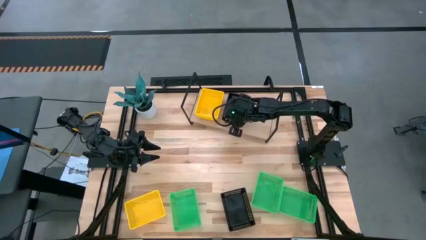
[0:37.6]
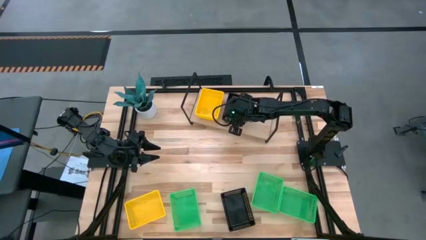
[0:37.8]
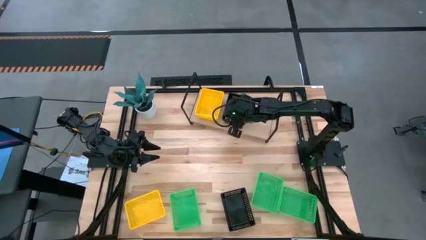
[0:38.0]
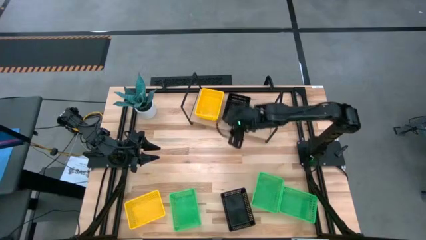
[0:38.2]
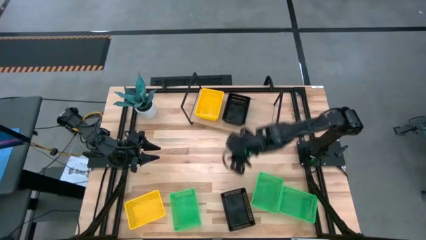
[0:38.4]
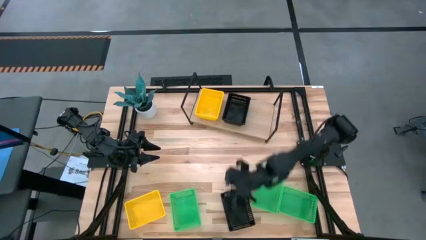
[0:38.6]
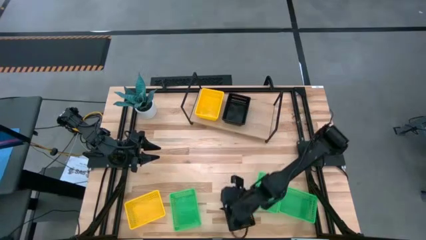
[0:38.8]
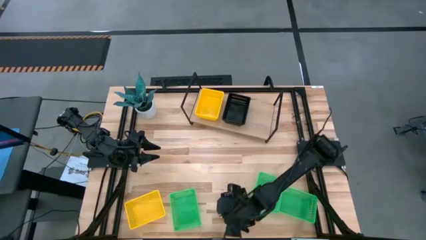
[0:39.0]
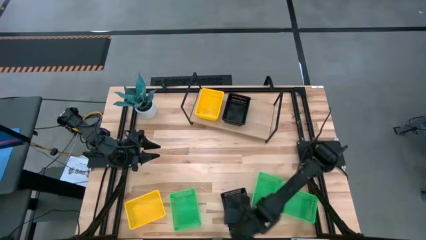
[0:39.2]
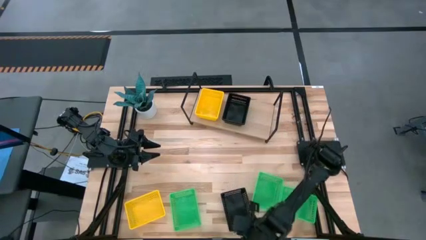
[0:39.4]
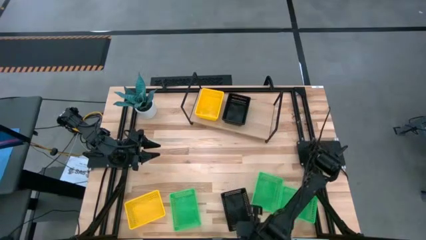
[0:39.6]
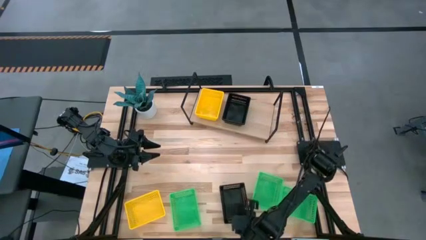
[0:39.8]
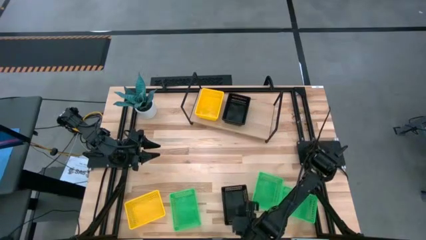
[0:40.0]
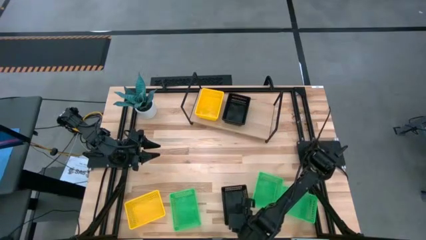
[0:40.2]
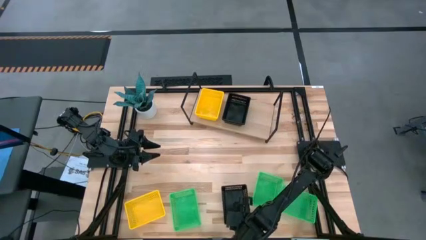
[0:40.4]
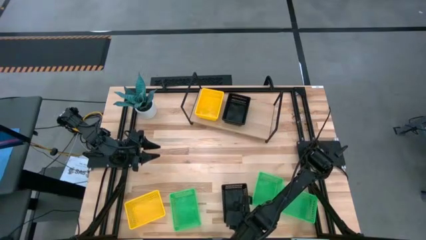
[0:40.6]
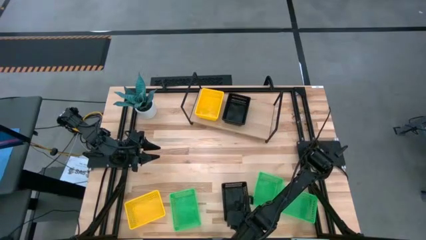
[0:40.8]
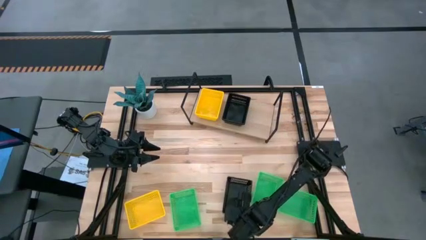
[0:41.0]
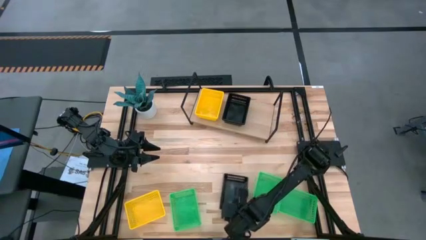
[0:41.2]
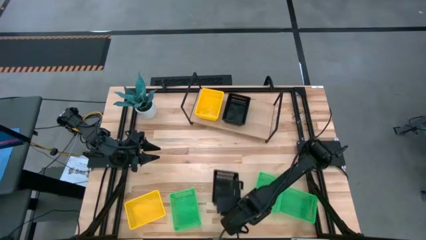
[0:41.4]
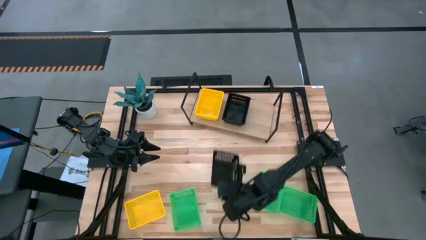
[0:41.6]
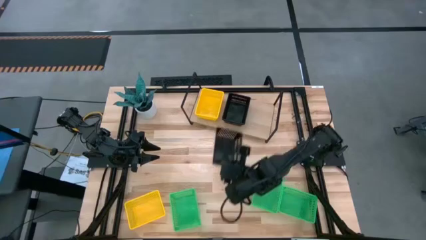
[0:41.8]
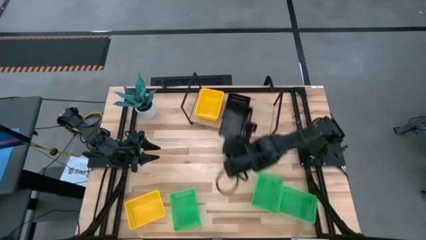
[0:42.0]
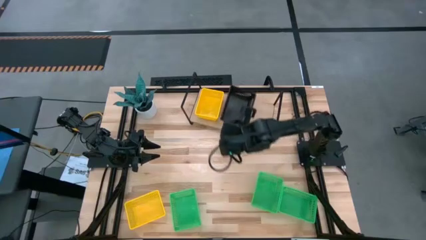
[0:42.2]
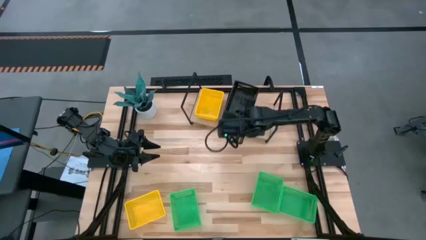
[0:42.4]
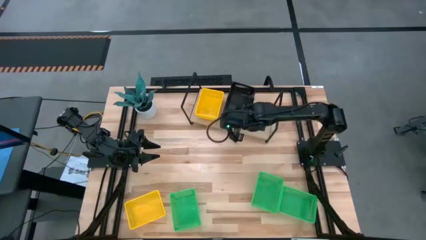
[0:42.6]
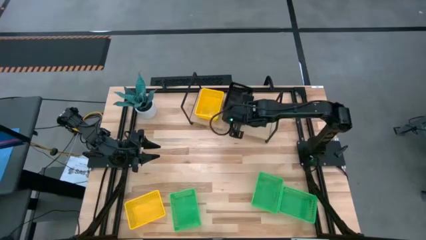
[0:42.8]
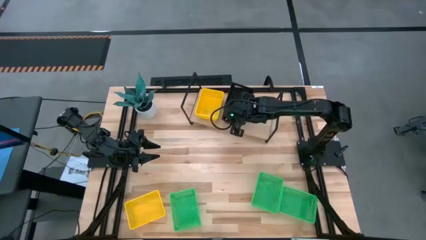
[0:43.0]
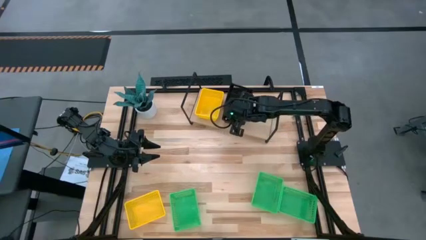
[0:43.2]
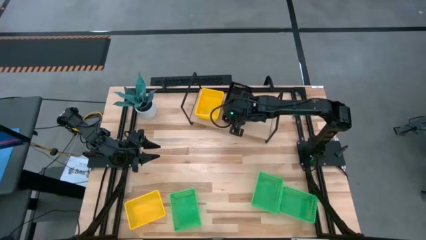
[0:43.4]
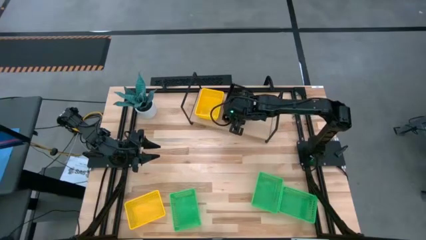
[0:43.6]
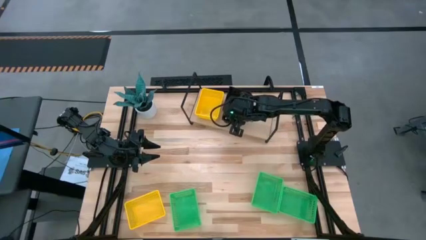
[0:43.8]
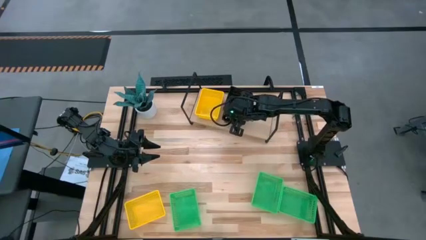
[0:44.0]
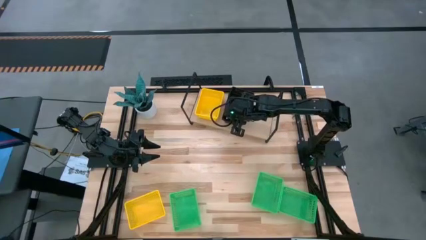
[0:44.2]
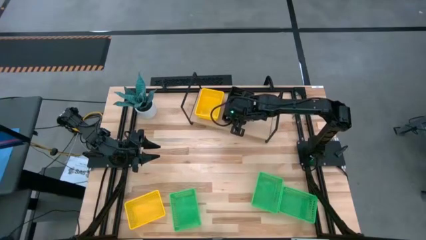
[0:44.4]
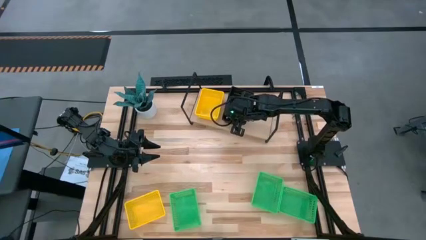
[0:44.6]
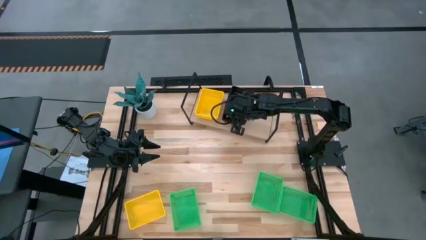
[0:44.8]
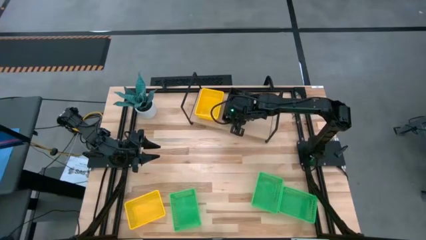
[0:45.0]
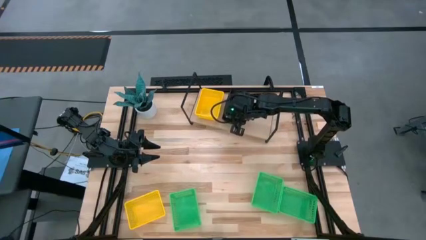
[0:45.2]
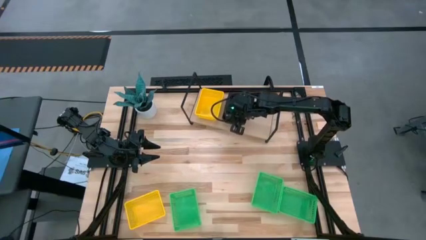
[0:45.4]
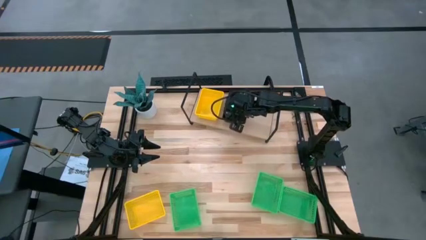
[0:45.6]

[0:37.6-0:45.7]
Task: Stack baskets on shelf by color
Stack the black bin on top of the black bin on the shelf

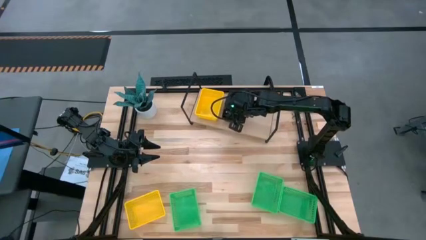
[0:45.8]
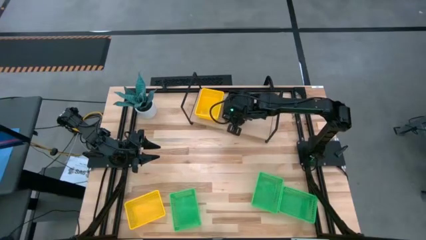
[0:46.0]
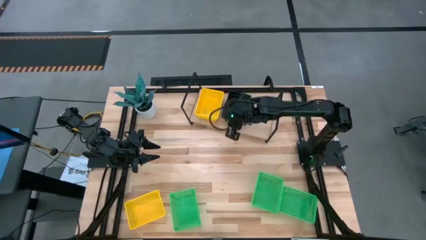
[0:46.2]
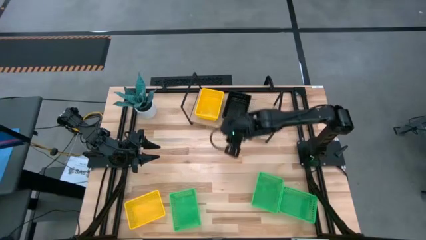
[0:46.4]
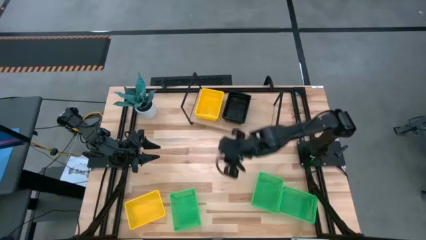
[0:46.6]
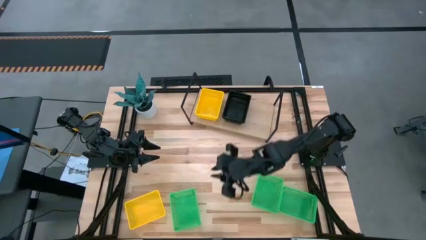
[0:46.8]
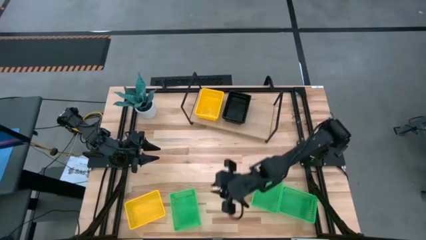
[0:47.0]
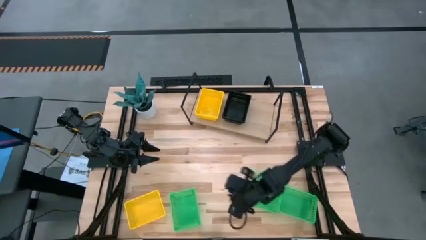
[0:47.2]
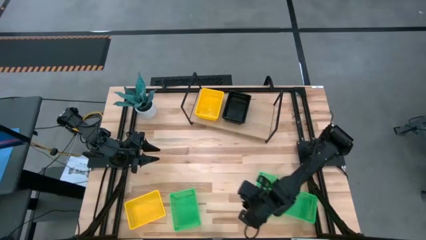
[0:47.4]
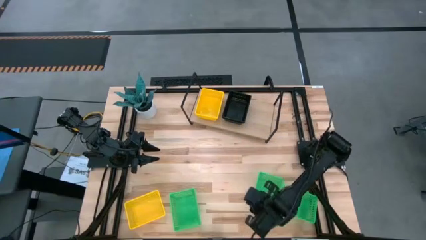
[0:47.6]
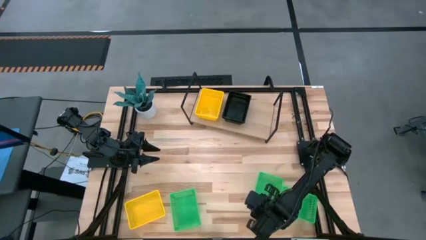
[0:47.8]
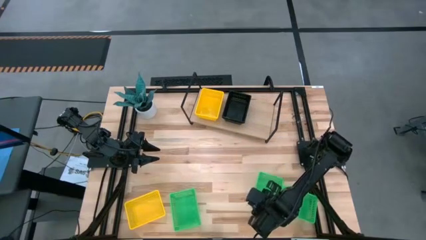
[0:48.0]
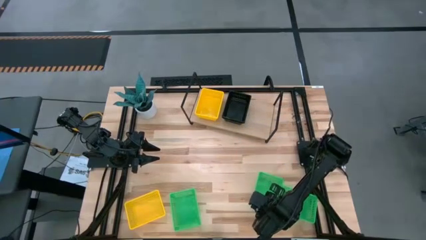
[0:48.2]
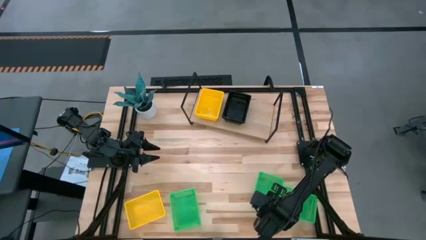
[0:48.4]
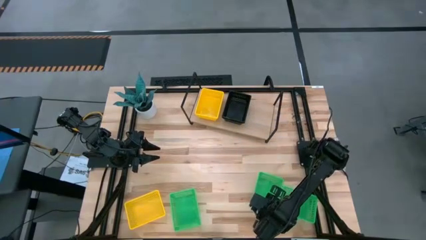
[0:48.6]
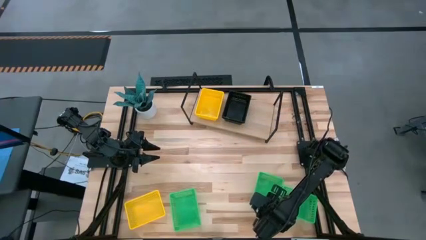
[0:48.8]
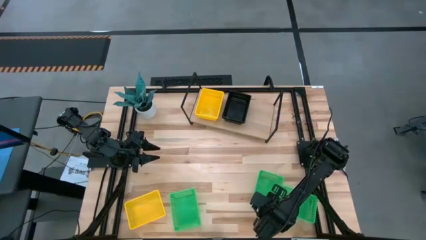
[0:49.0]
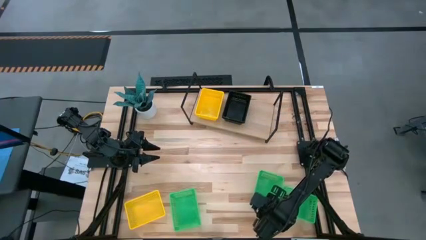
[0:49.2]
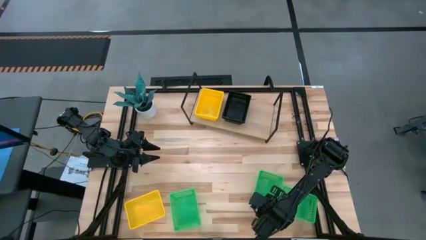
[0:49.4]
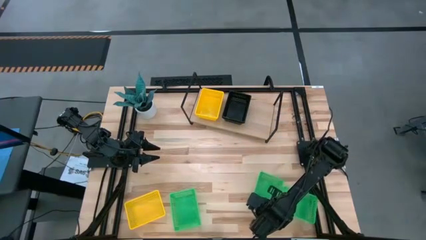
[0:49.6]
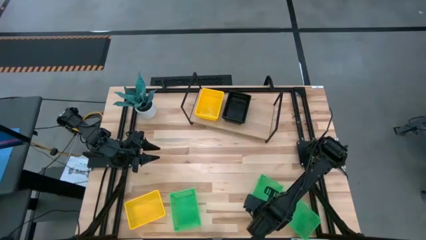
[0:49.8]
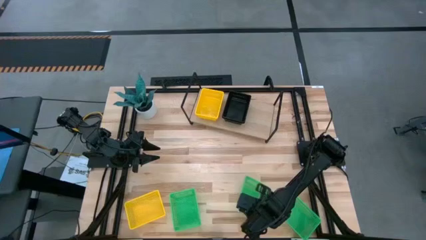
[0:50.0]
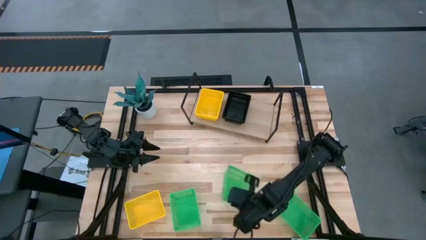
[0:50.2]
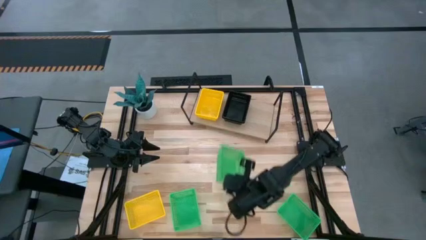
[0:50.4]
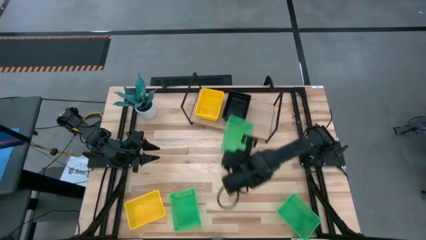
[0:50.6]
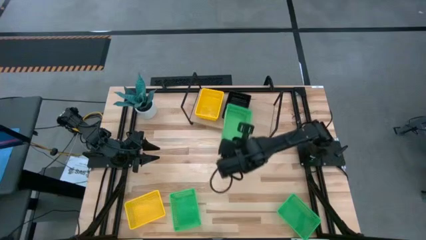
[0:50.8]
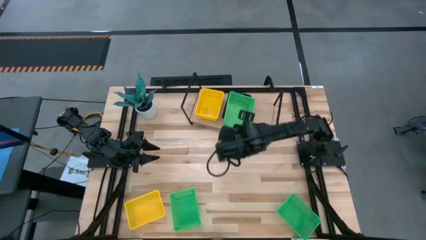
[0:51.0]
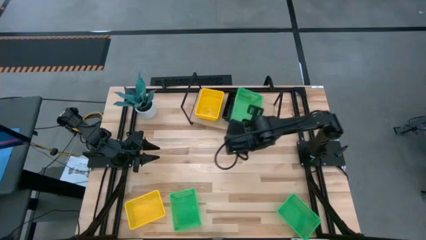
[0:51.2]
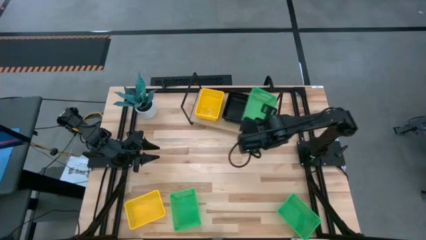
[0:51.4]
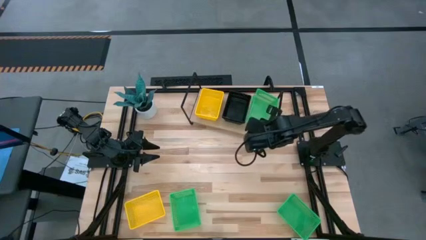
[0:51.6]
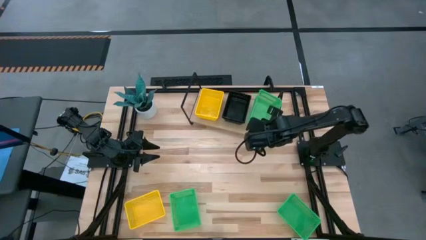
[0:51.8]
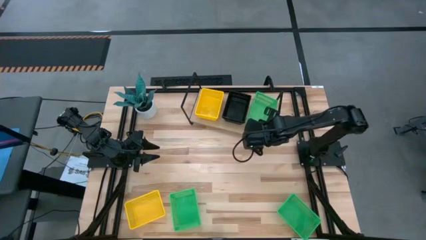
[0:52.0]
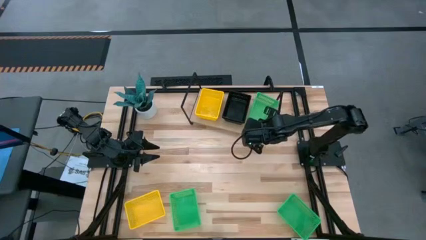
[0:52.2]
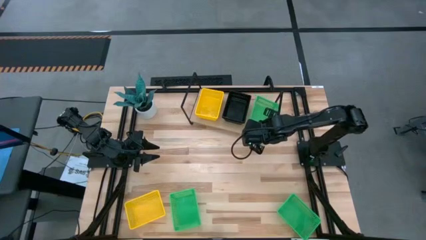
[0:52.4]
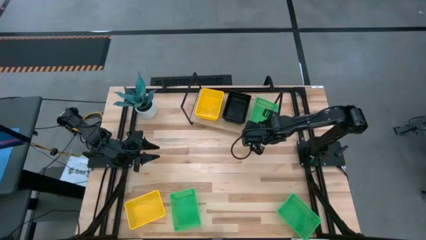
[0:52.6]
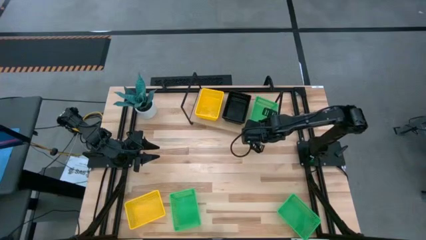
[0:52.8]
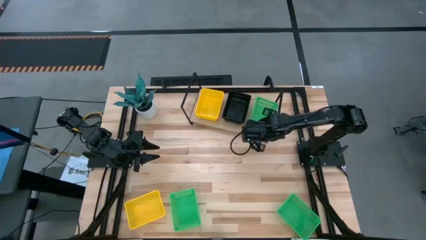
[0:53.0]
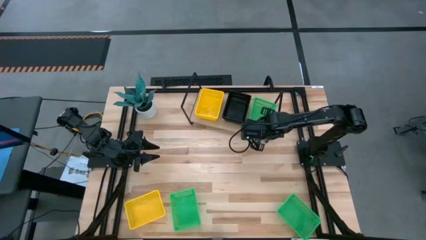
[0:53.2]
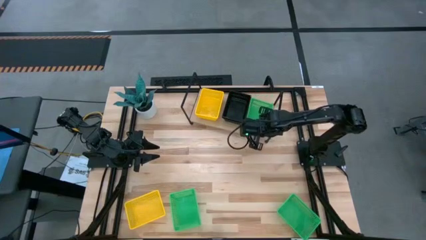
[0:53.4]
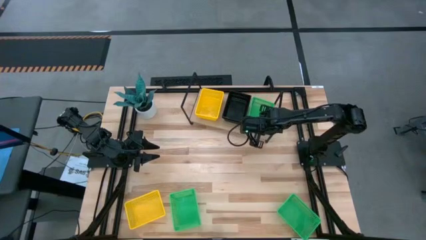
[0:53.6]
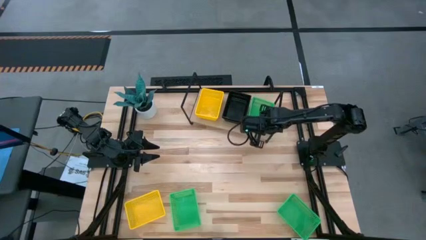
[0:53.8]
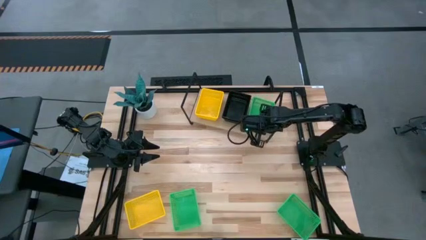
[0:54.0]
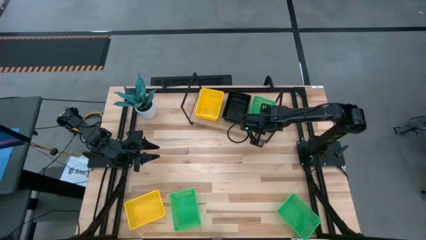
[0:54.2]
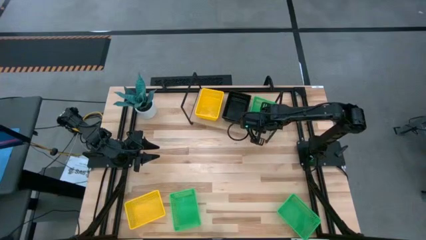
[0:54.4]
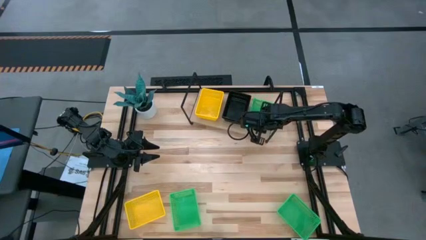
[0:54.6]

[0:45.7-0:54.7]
Put the middle green bin into the shelf
